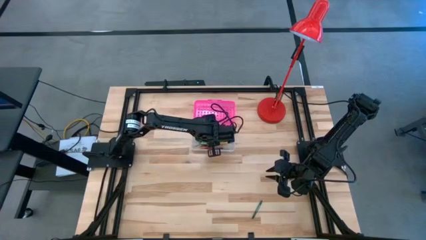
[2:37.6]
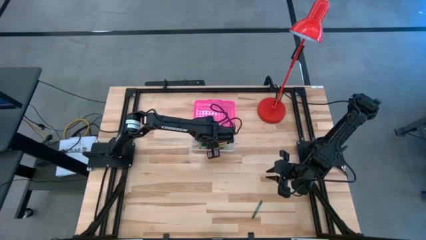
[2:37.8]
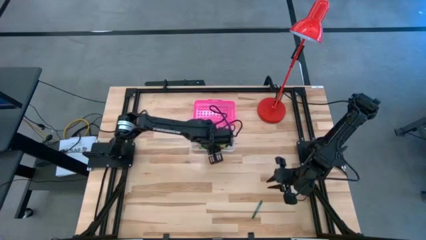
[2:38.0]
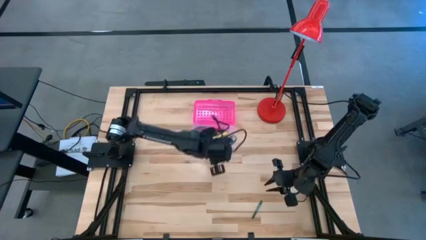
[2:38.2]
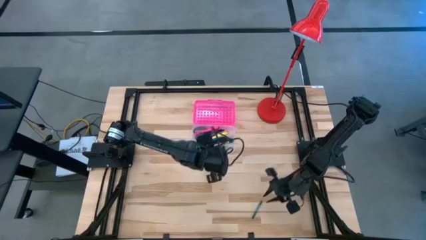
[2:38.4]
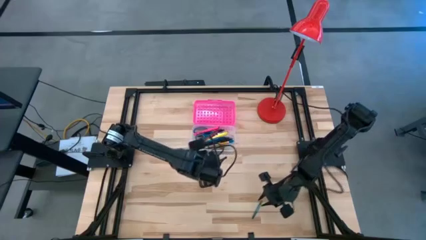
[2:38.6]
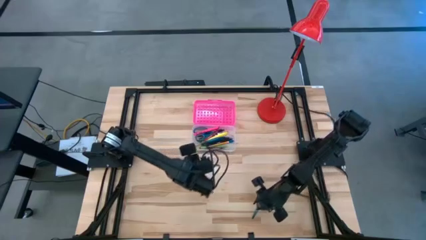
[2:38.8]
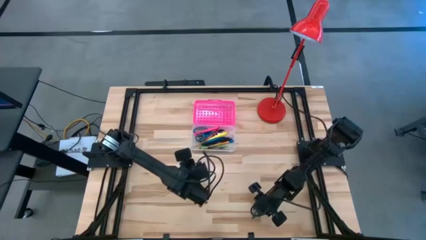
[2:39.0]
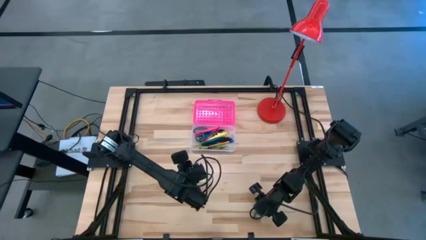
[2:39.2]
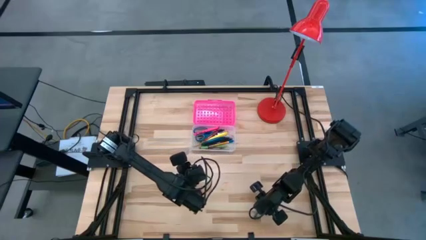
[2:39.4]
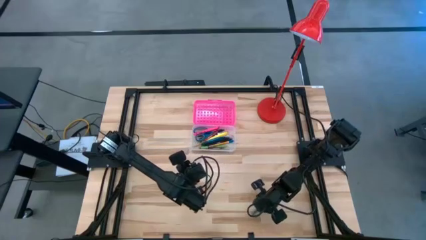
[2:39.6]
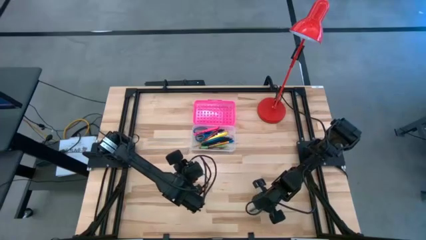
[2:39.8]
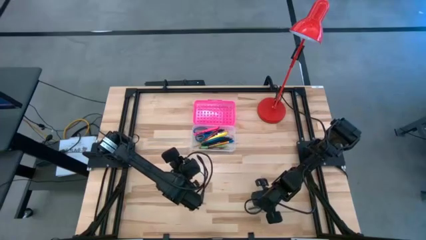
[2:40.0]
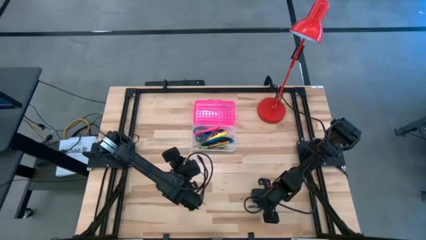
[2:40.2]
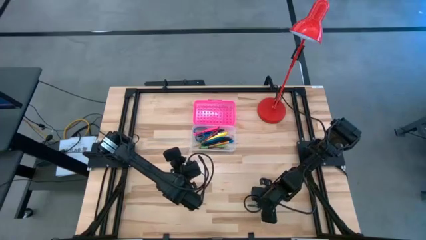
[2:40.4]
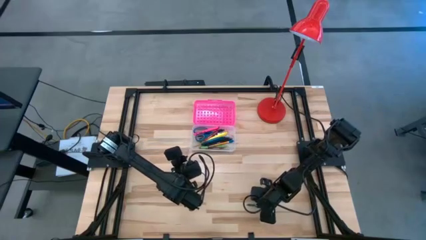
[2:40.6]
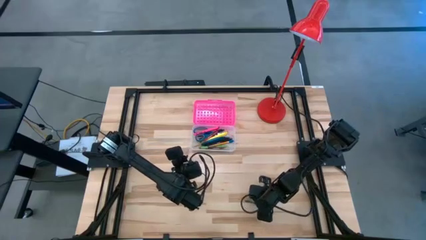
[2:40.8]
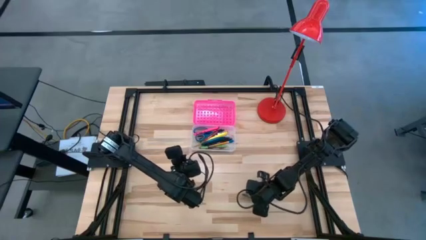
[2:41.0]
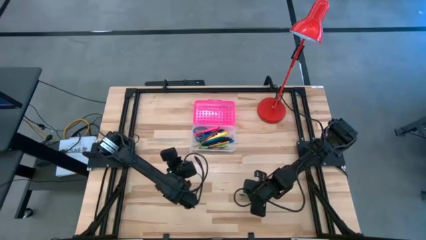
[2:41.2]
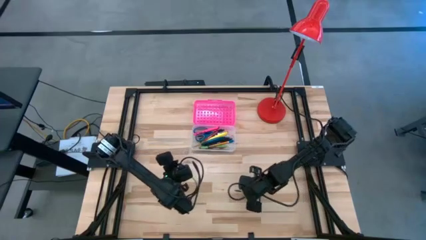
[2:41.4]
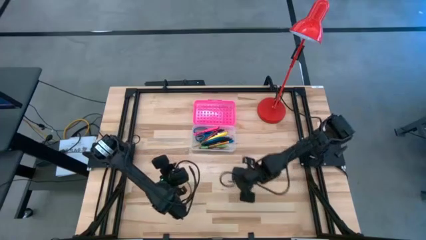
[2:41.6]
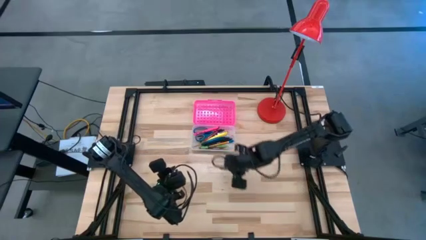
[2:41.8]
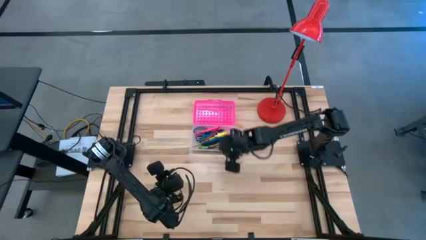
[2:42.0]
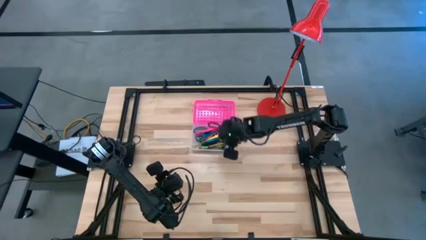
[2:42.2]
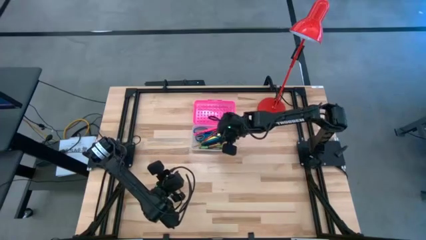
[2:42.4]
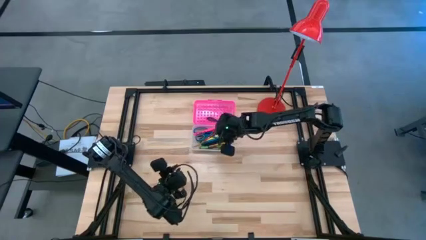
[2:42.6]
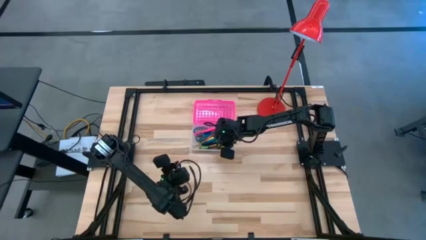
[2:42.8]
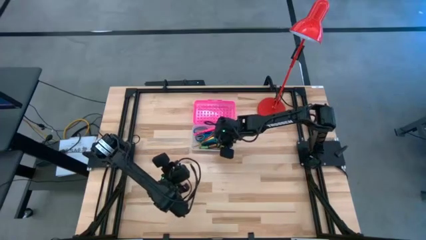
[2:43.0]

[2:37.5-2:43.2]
Task: Pick & place school supplies into a supply box
Put the green crayon into the pink supply box

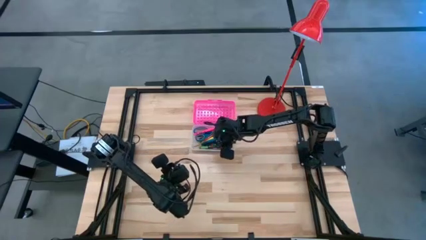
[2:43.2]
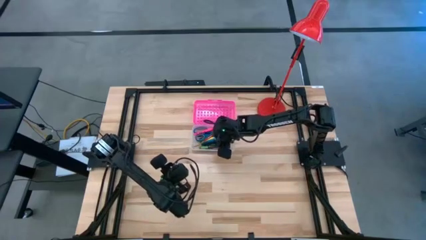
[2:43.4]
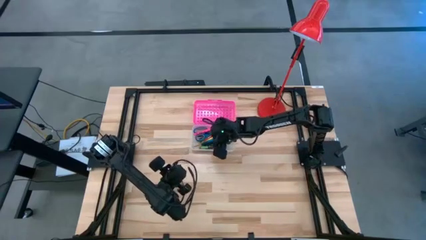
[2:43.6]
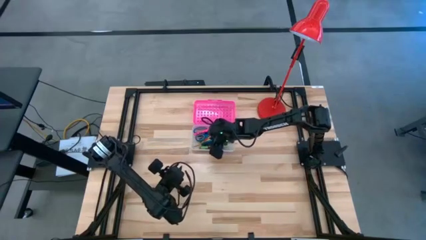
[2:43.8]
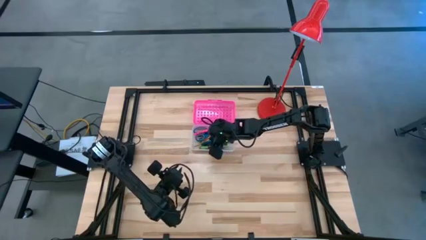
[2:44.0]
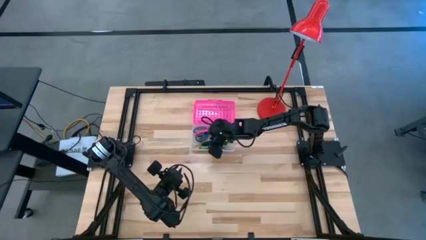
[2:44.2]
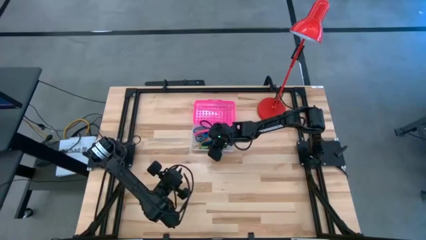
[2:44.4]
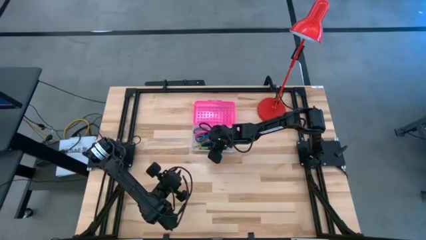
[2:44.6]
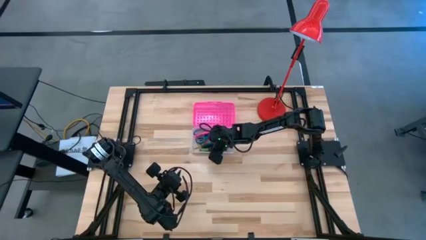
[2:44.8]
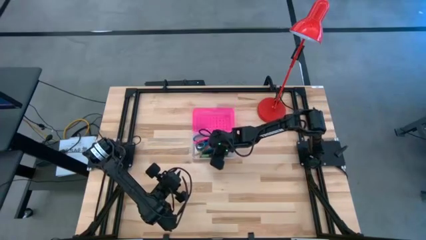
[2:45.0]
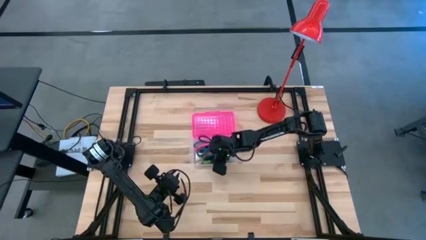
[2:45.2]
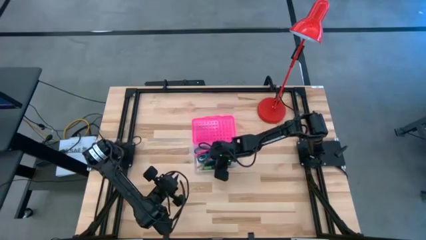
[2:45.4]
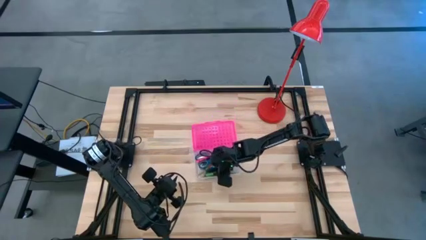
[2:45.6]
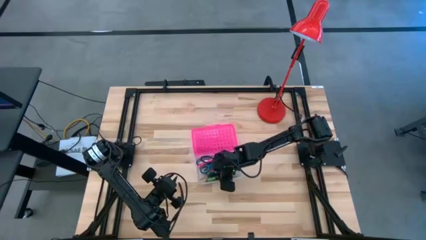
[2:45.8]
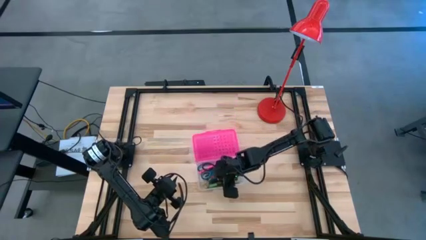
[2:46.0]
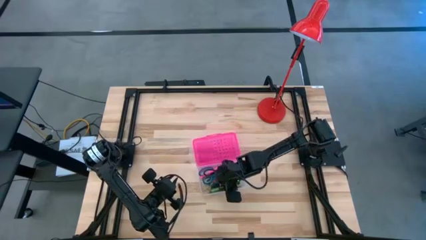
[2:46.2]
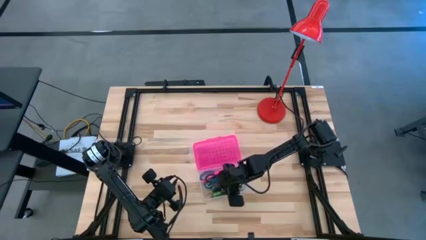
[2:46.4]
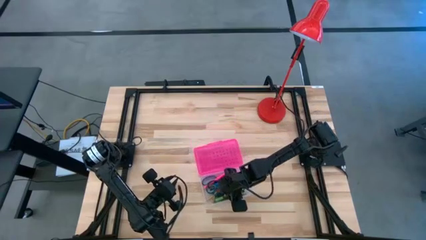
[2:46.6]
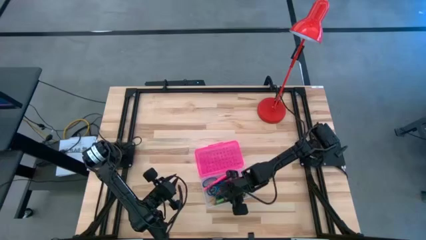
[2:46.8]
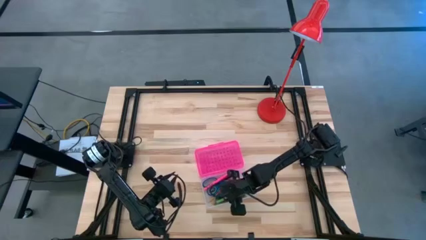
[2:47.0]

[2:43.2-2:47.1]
Move the pink supply box to the bottom center of the table

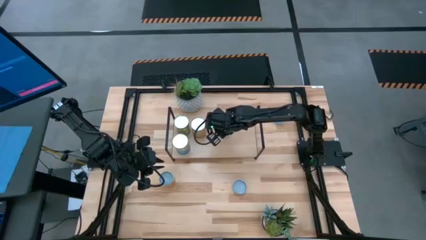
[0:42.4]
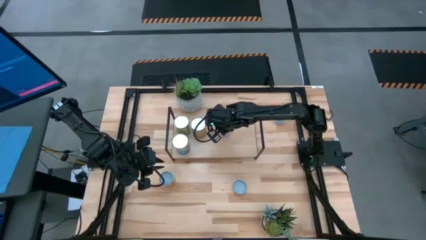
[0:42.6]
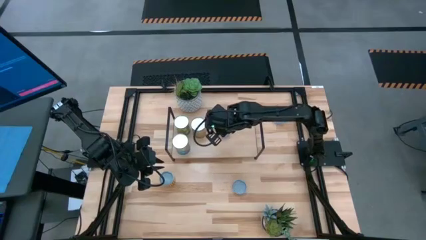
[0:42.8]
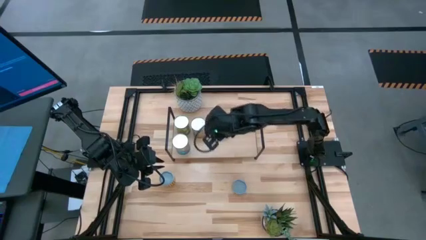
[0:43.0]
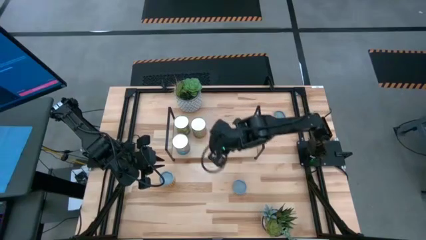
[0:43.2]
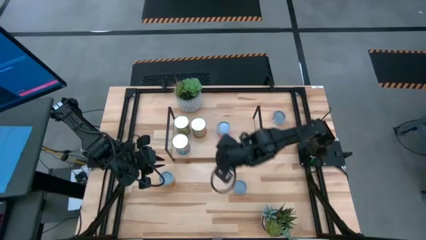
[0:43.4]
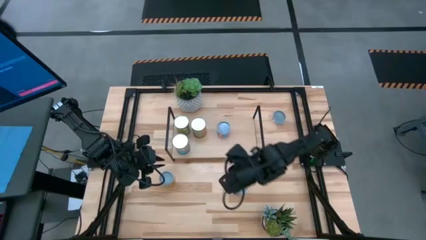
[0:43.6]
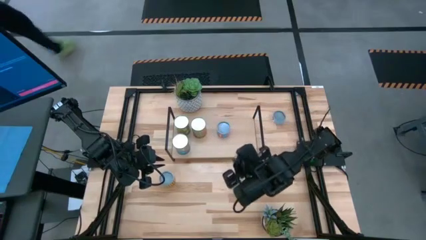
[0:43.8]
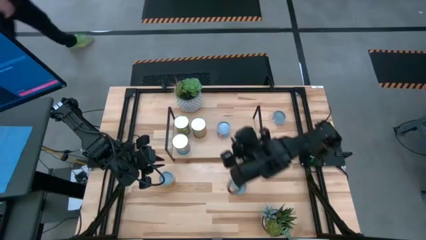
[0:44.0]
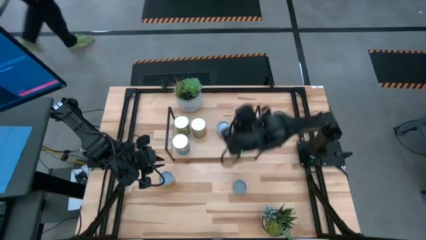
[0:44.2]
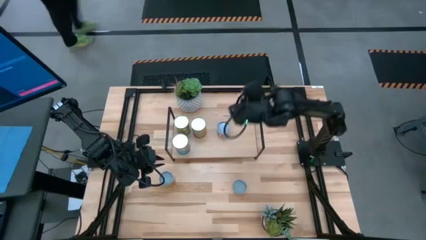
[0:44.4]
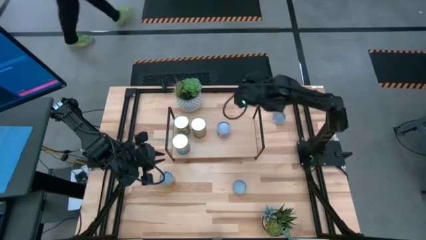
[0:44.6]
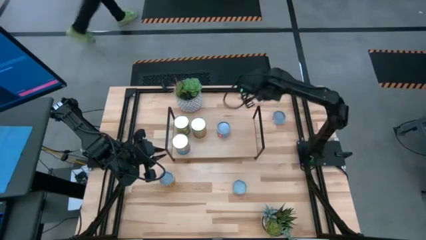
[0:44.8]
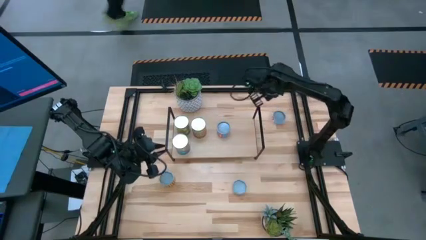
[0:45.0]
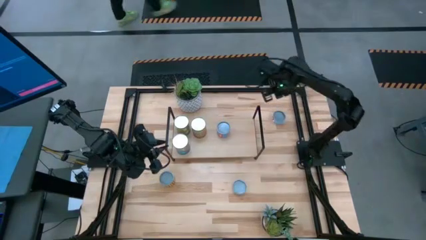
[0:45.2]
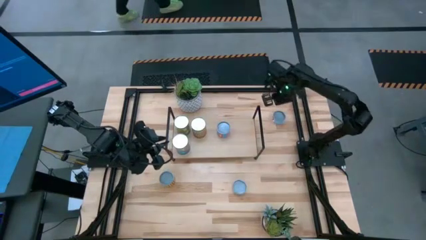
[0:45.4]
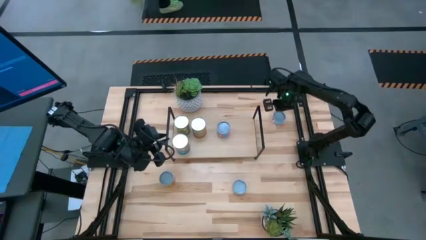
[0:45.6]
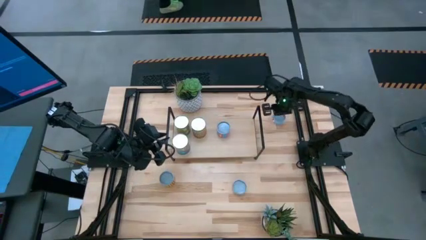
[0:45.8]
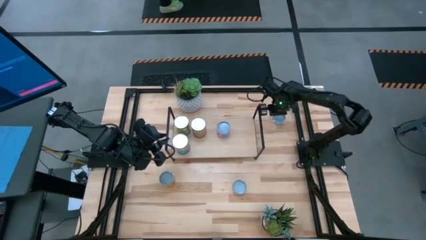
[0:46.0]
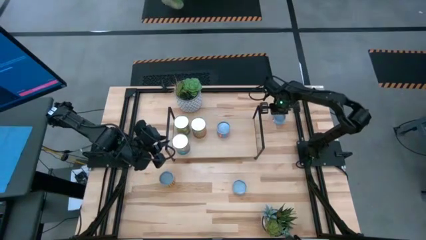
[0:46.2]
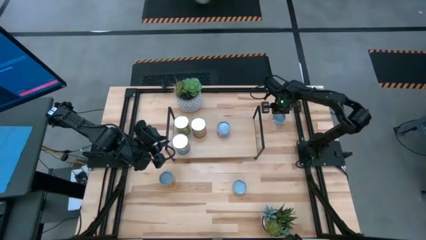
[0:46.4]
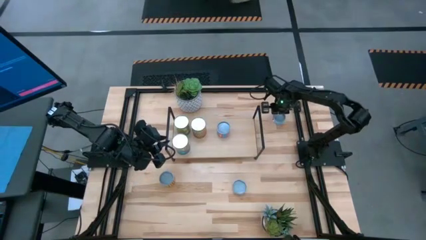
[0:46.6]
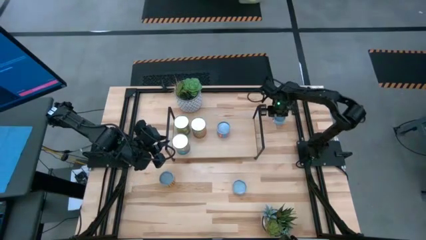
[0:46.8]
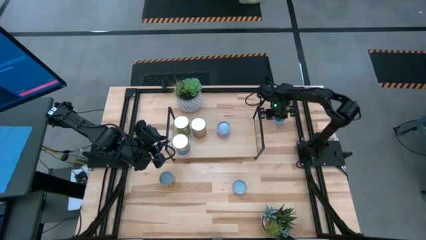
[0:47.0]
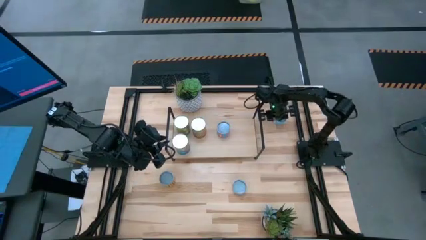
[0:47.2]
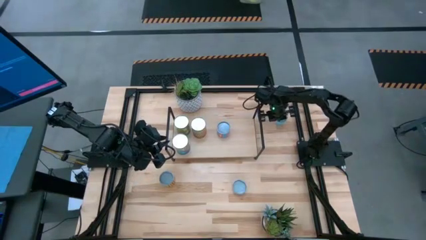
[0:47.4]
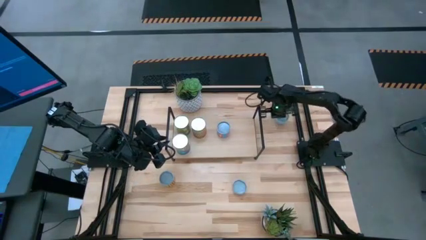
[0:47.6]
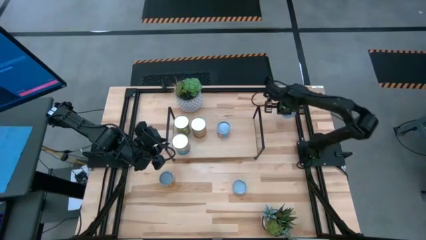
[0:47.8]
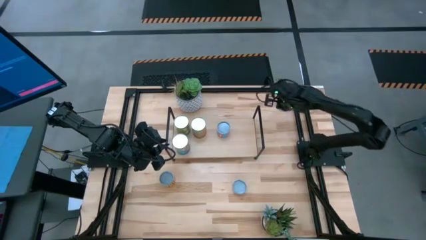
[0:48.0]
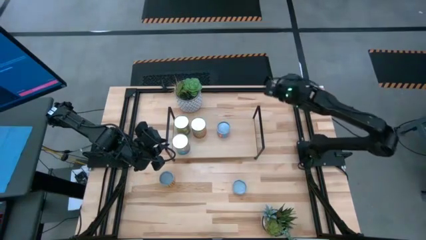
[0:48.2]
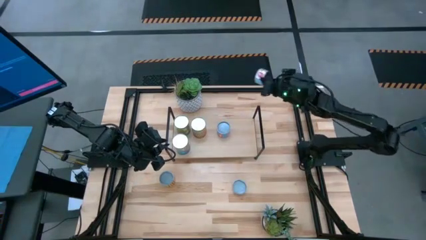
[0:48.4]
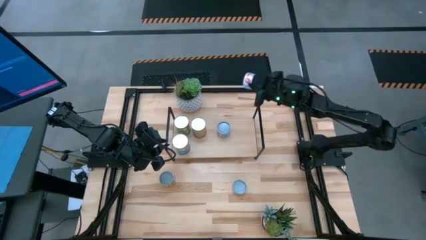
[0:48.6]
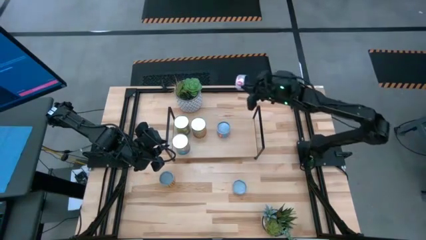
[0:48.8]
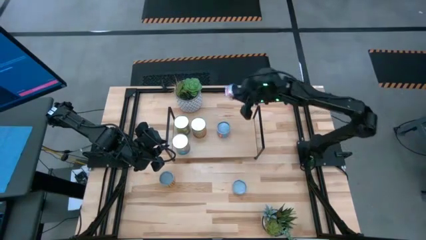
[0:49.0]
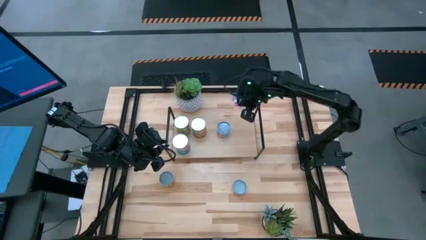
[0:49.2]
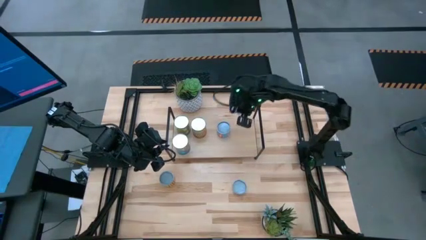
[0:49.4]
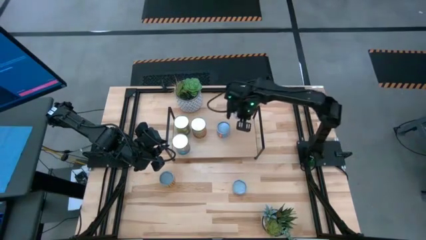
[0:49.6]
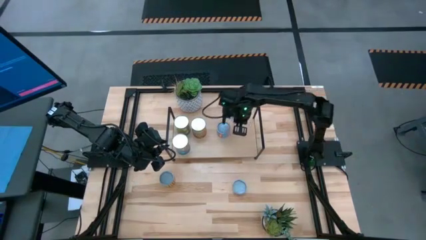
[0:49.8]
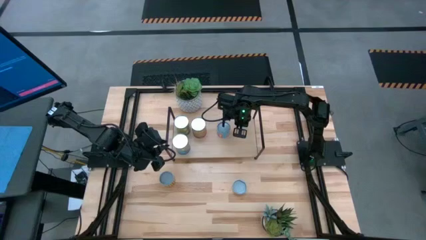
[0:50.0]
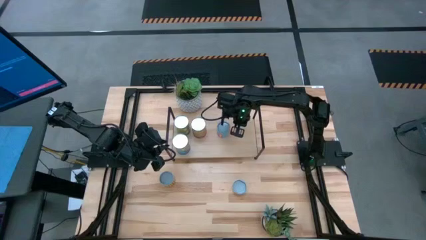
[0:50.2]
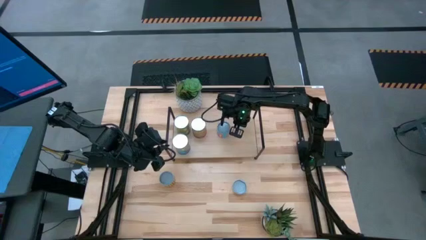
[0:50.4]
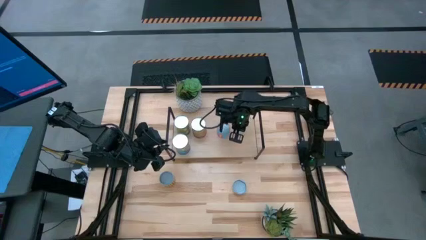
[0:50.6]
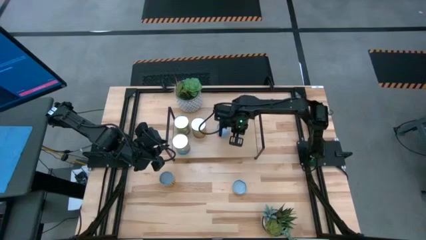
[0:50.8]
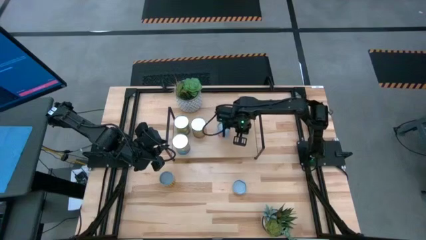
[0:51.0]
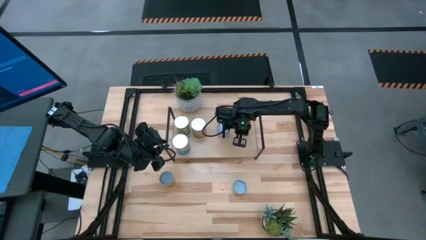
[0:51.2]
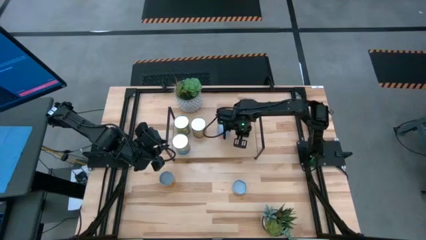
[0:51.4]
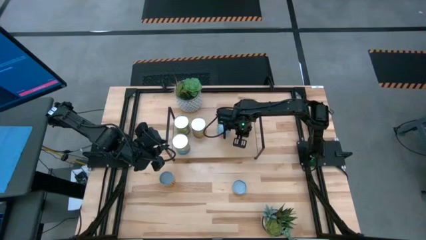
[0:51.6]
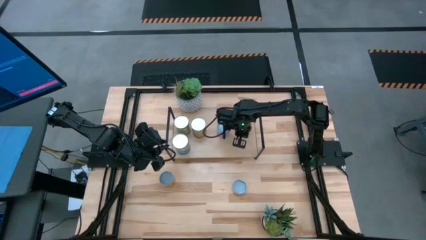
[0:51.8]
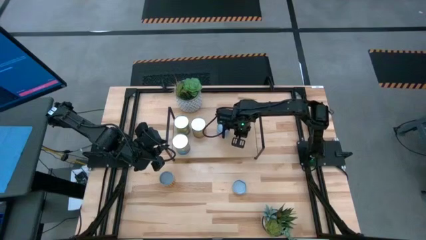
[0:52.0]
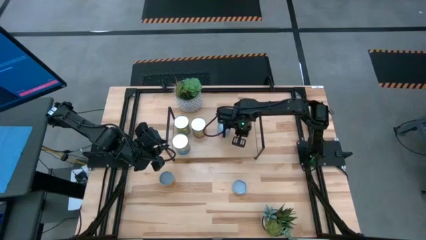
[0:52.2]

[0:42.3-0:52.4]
Task: Pick and place cans onto a shelf
Put the canned salmon on the shelf
